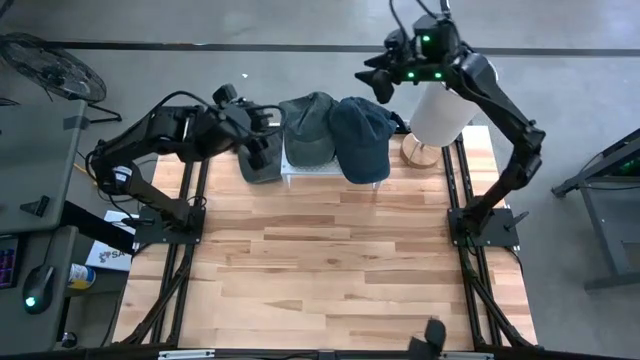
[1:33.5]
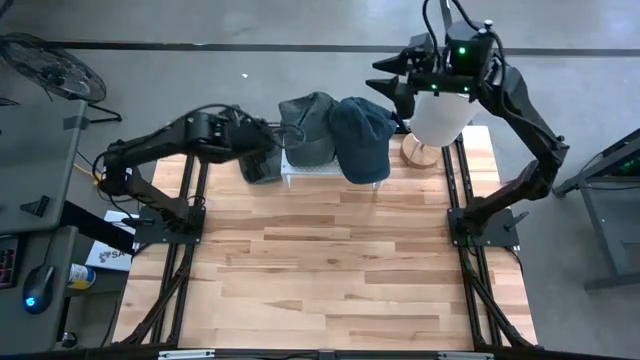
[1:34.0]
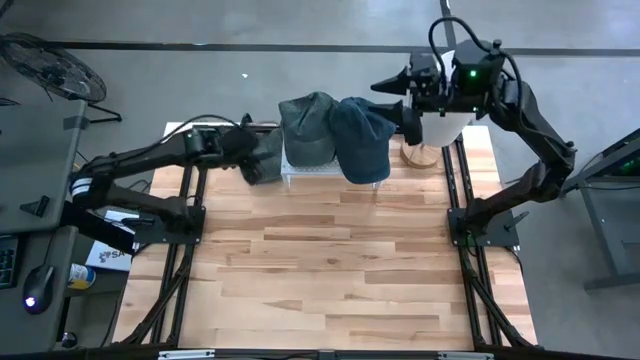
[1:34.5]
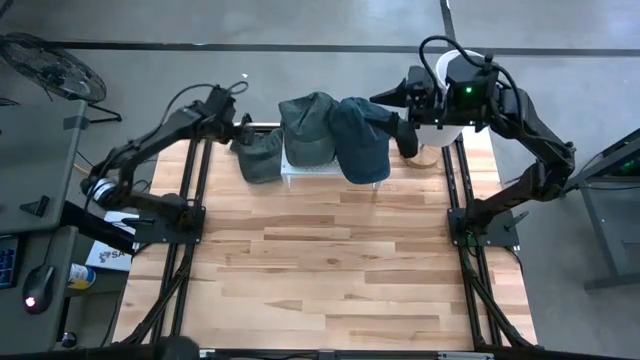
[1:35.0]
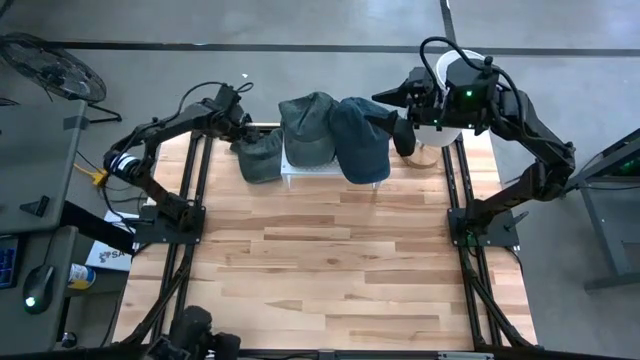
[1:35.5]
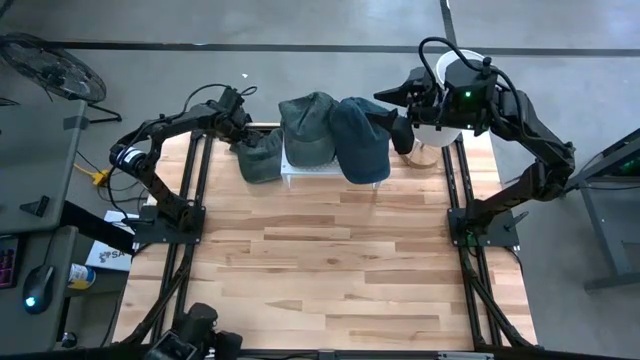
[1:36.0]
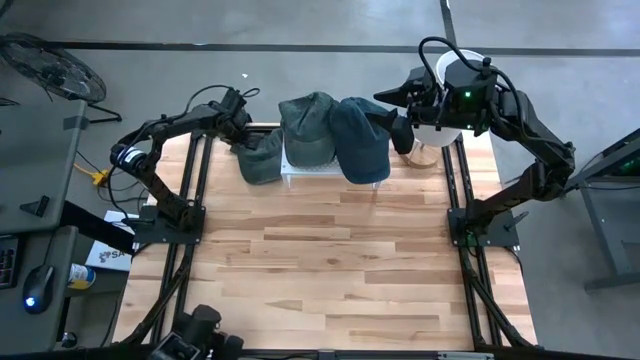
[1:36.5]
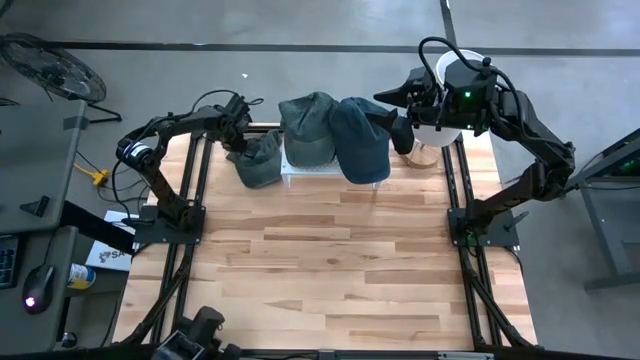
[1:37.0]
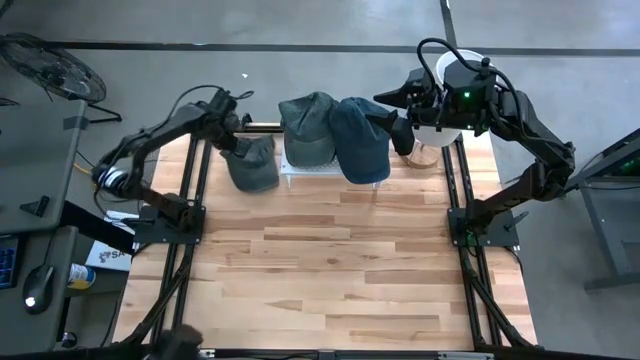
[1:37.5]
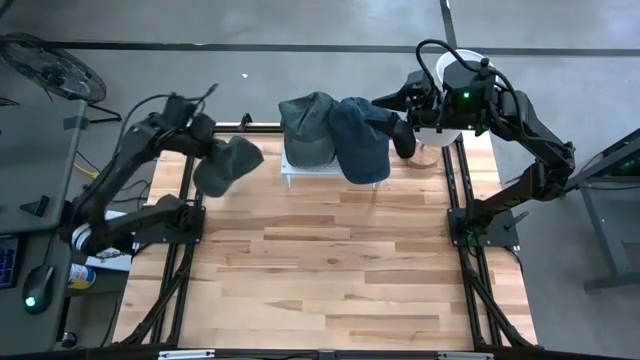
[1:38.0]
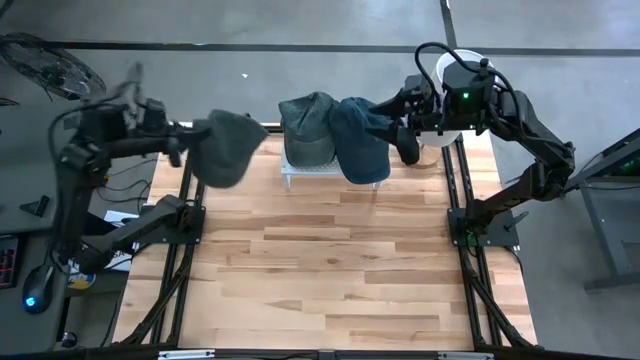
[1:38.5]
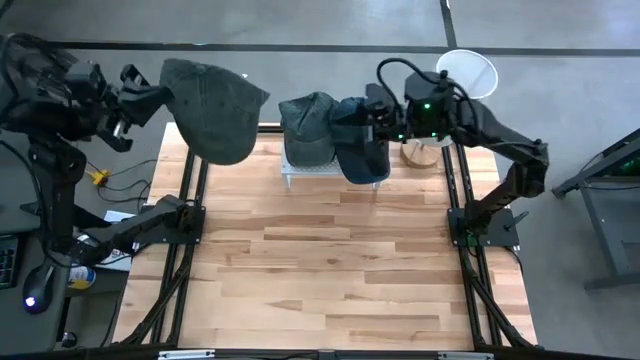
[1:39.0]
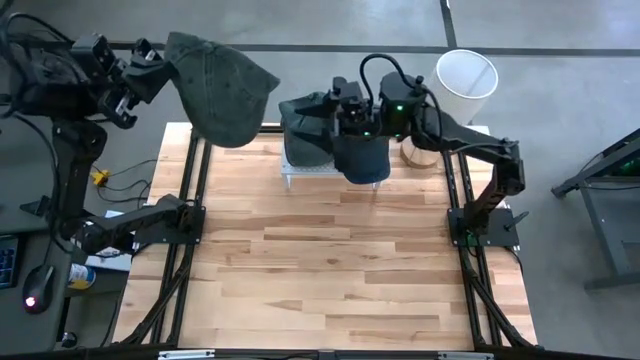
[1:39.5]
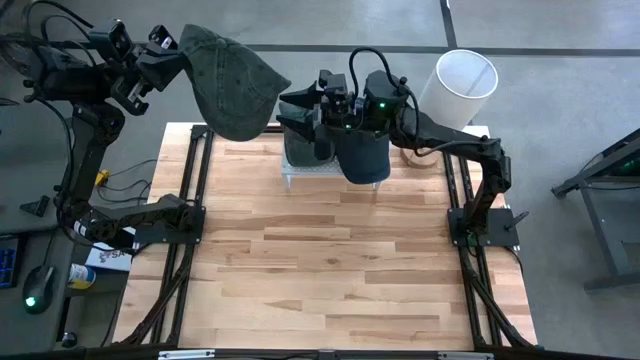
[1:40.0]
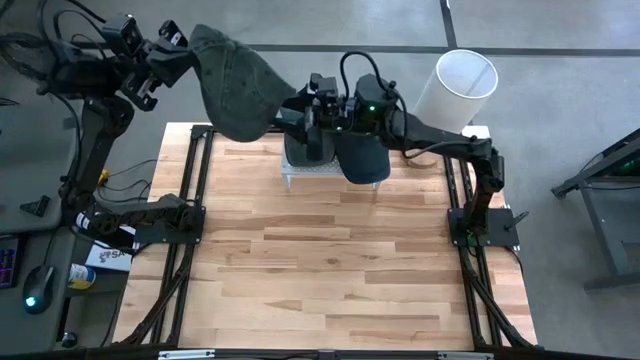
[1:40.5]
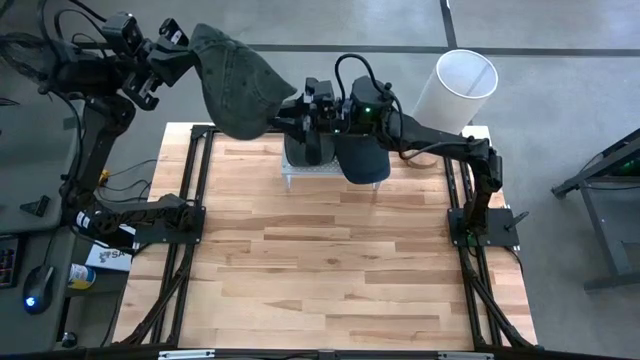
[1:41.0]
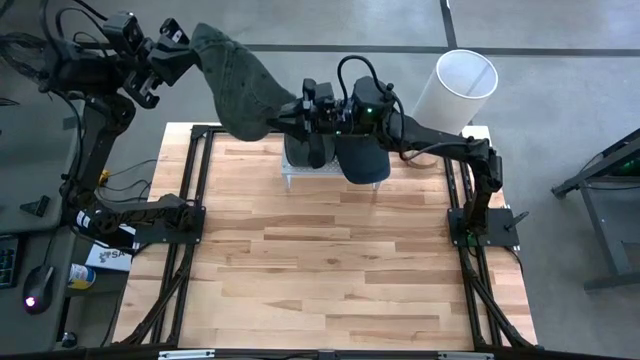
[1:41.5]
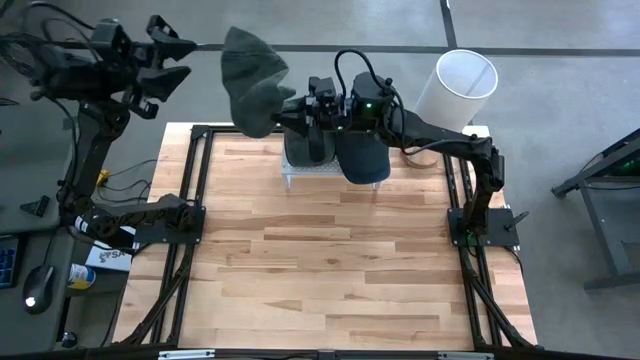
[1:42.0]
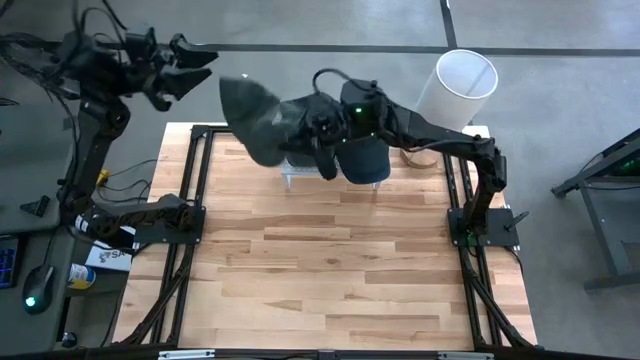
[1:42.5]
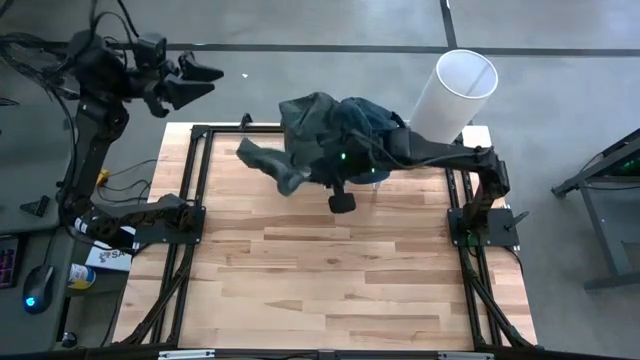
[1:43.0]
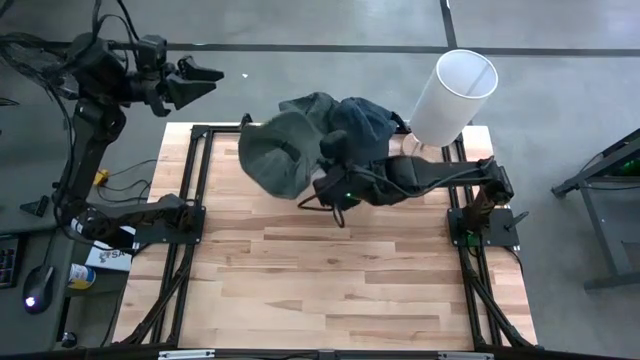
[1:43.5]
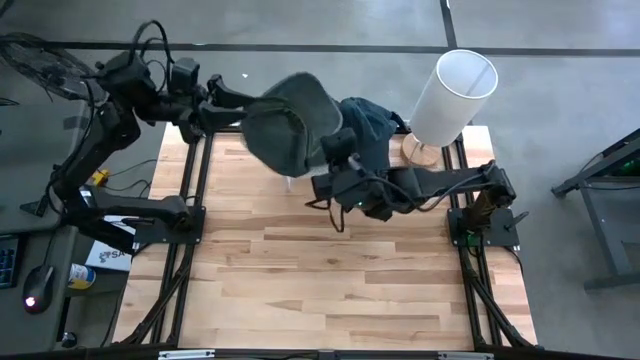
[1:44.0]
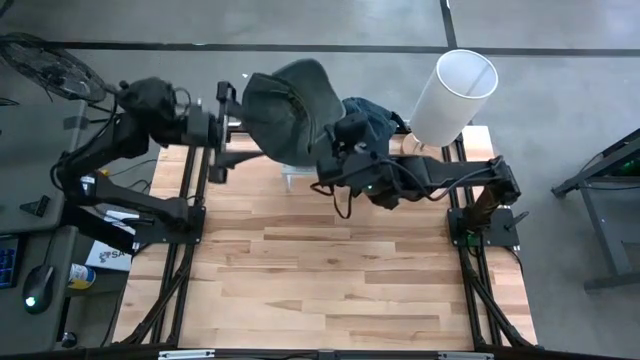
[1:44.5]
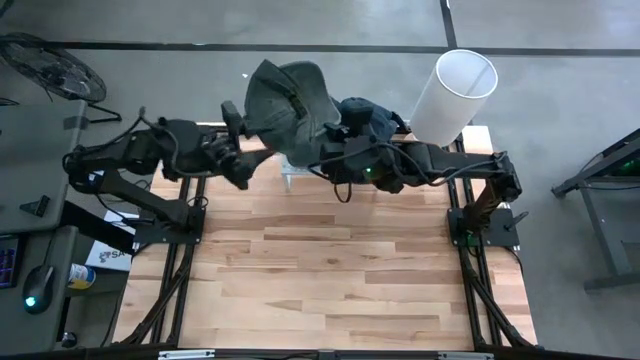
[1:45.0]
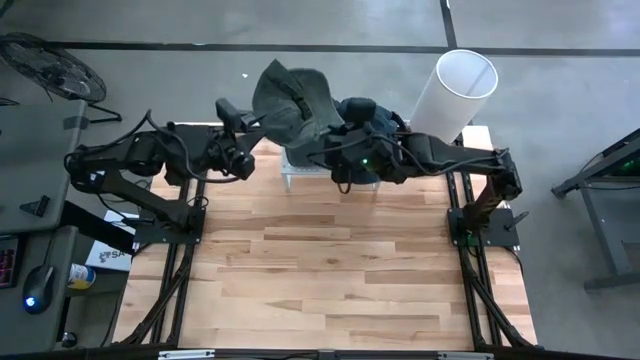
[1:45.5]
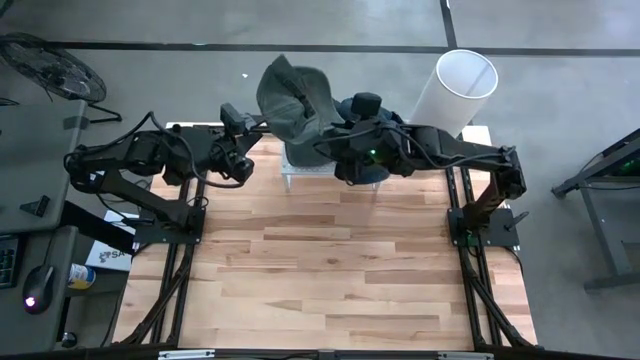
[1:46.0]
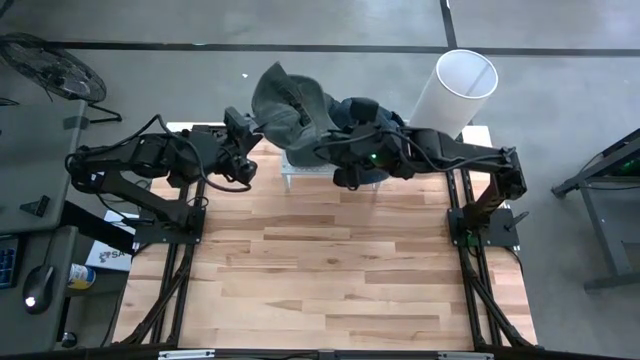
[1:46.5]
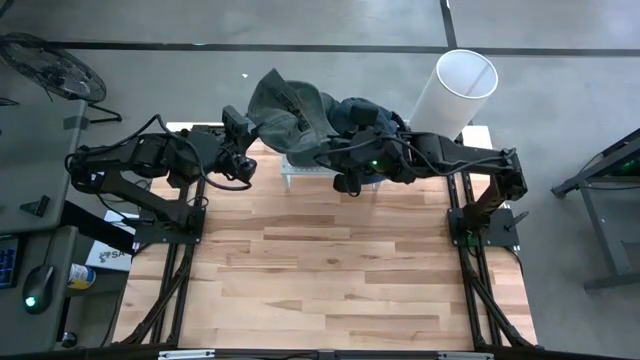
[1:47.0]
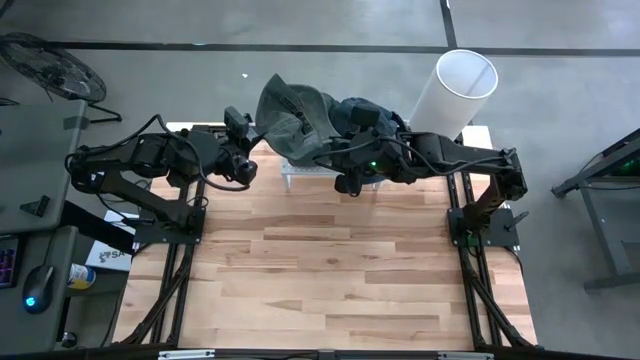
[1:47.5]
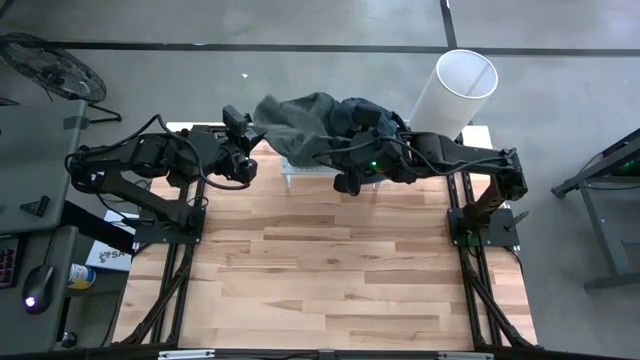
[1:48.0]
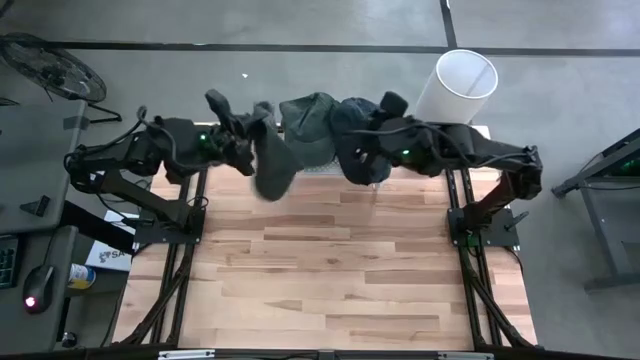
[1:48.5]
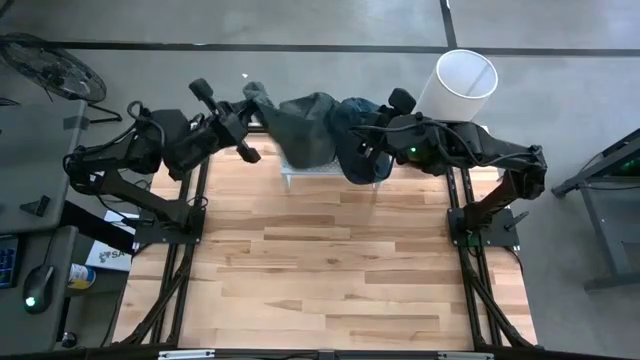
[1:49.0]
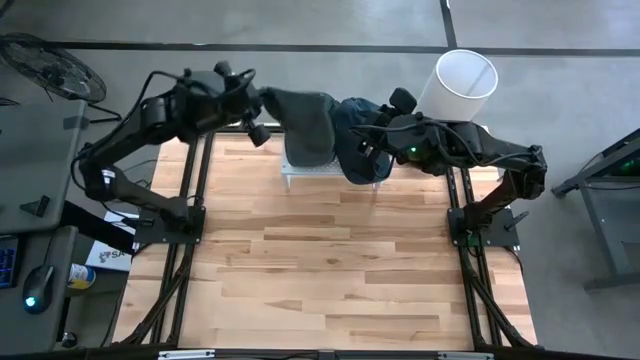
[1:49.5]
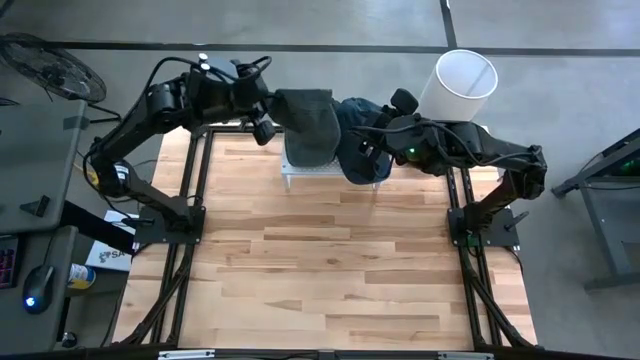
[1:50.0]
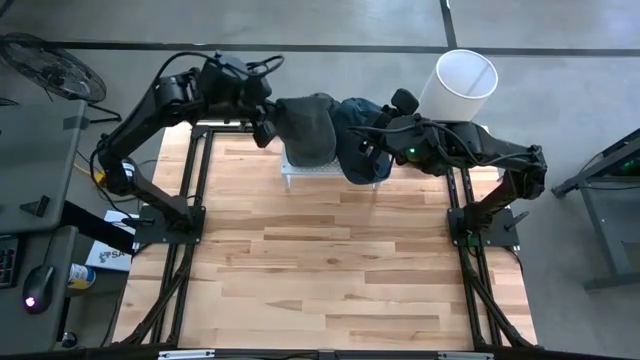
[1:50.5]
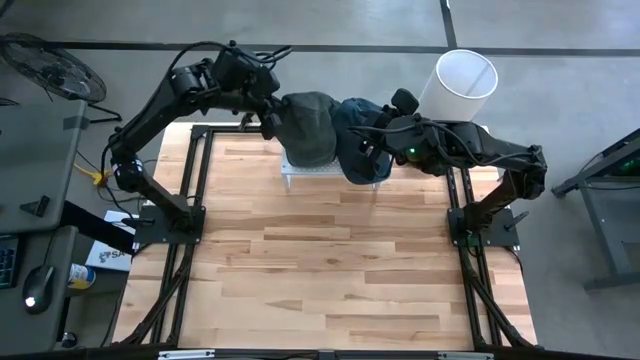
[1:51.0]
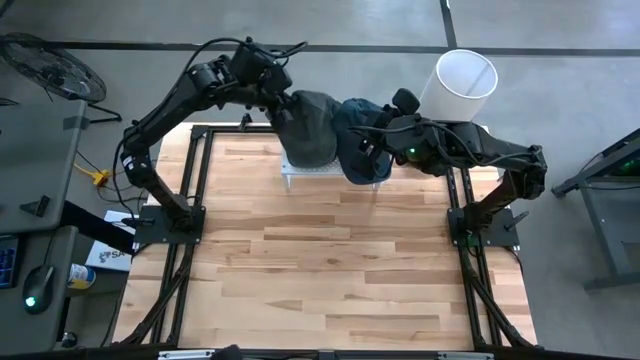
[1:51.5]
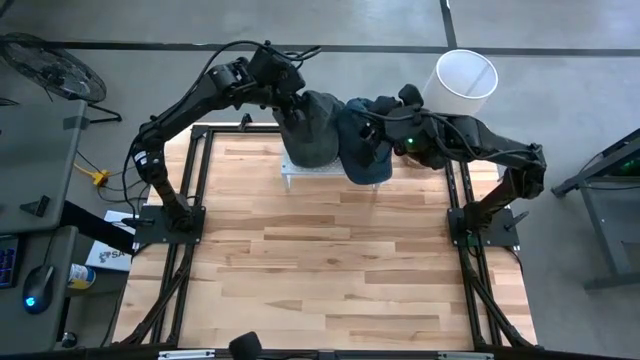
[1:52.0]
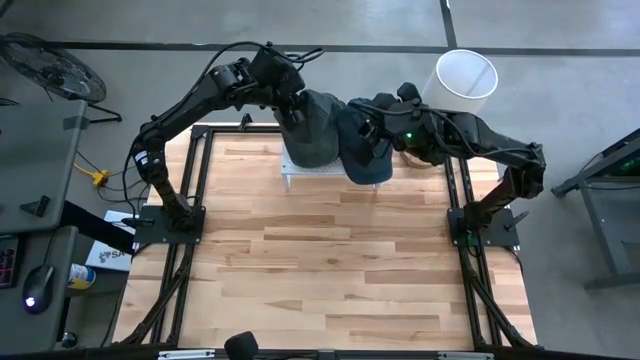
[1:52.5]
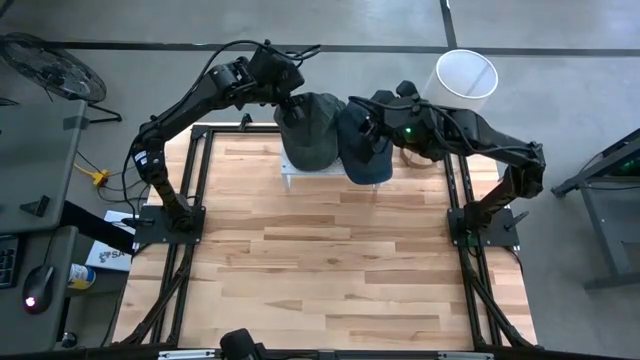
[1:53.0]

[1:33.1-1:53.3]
Task: Pick & Place hat
Stack the dark green cap on the dark green cap on the shelf

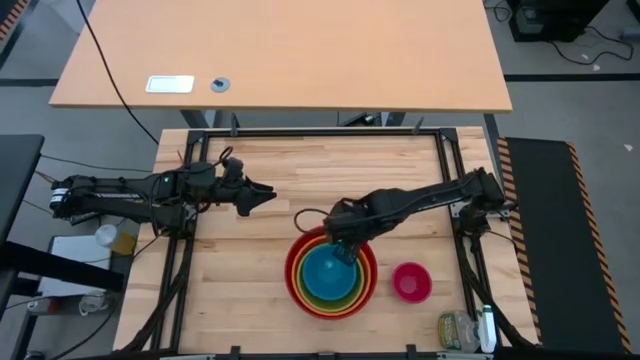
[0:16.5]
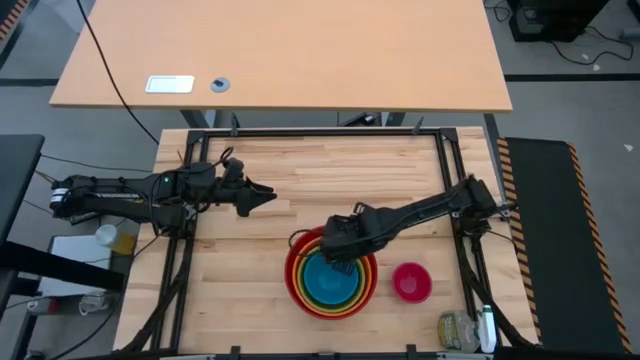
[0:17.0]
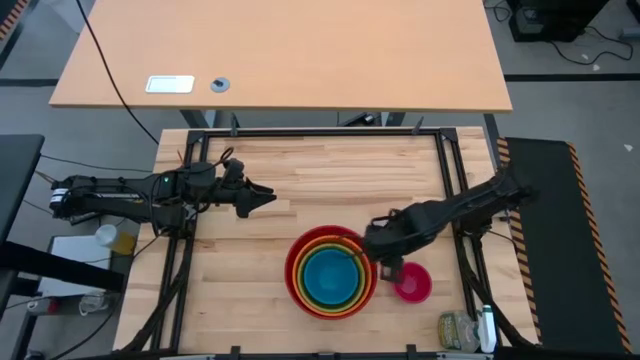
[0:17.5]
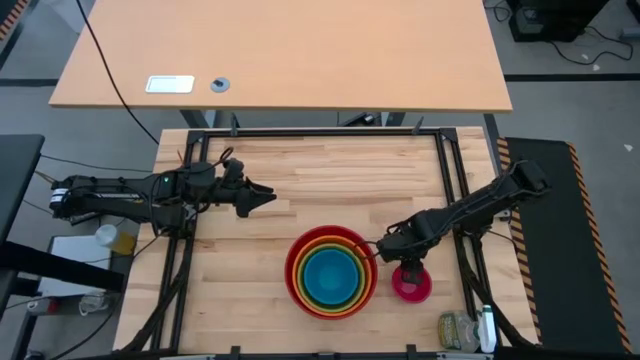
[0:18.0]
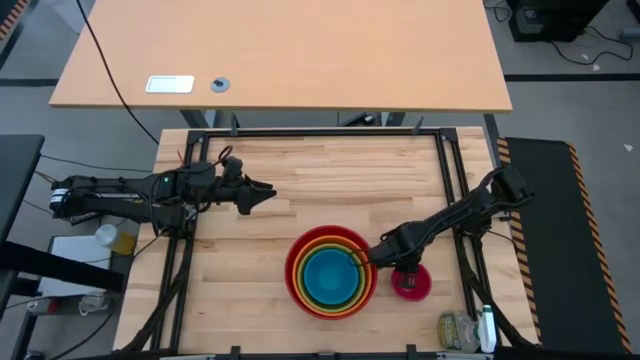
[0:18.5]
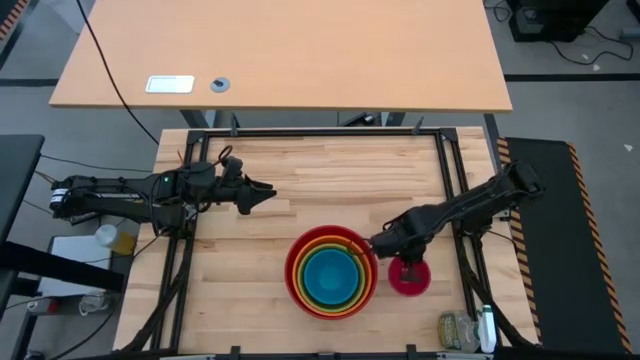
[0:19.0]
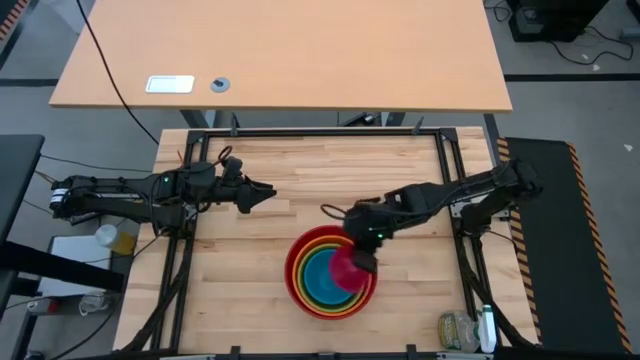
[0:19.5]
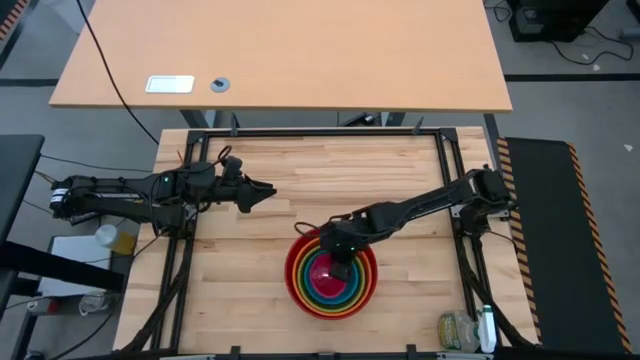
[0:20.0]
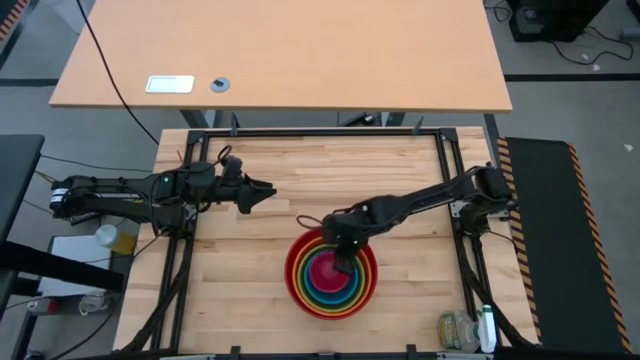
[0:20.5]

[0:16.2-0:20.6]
Task: Nest bowls inside each other by size order
stack the pink bowl on top of the blue bowl
